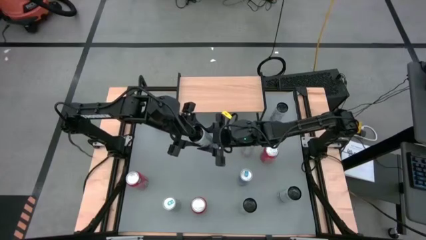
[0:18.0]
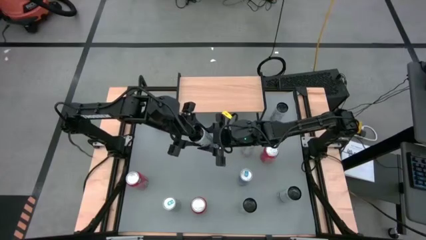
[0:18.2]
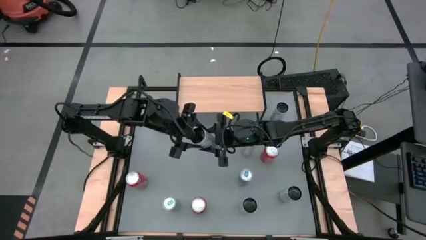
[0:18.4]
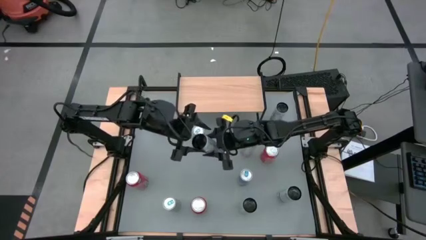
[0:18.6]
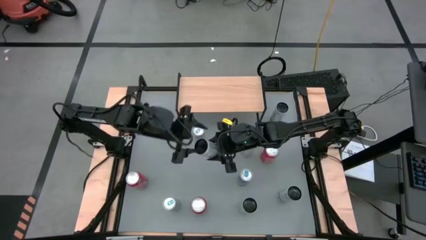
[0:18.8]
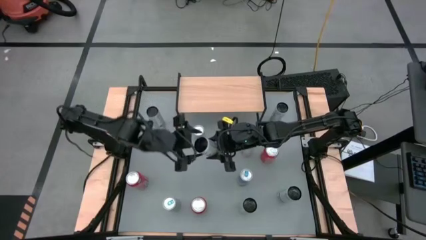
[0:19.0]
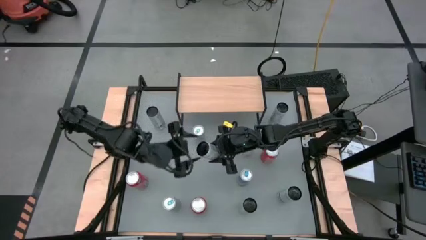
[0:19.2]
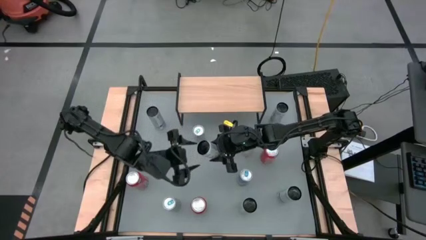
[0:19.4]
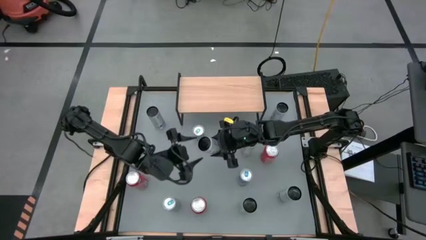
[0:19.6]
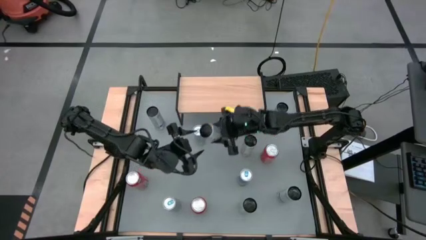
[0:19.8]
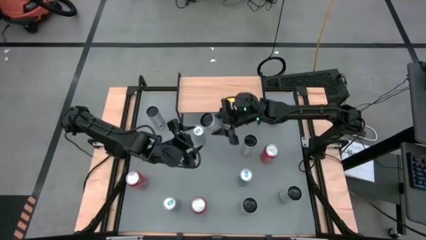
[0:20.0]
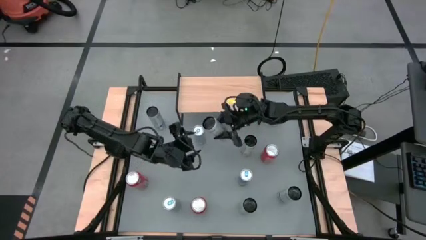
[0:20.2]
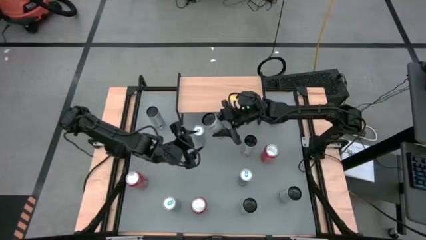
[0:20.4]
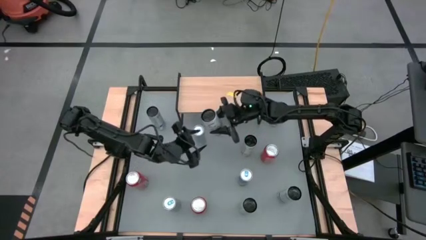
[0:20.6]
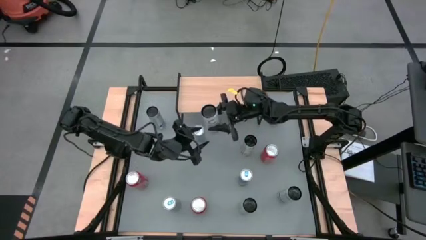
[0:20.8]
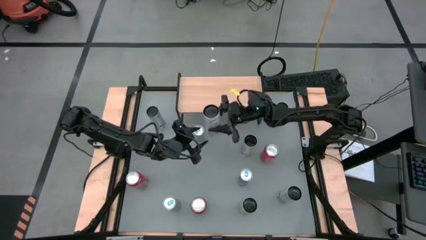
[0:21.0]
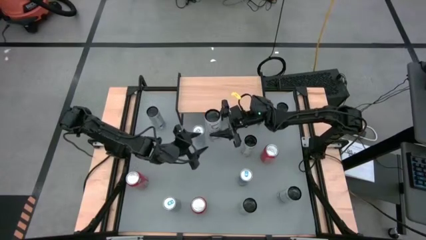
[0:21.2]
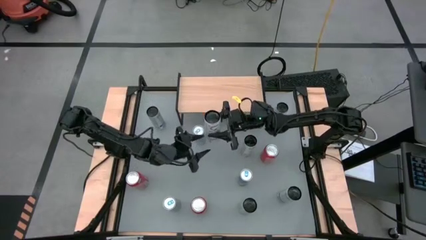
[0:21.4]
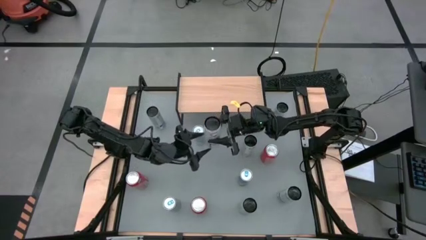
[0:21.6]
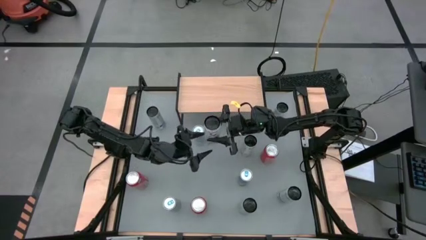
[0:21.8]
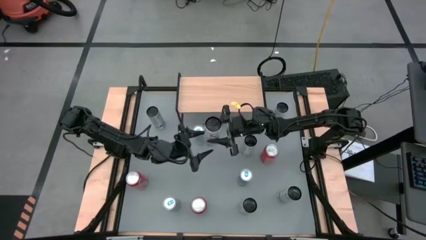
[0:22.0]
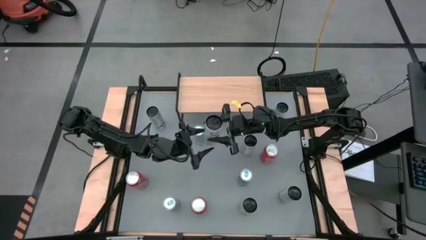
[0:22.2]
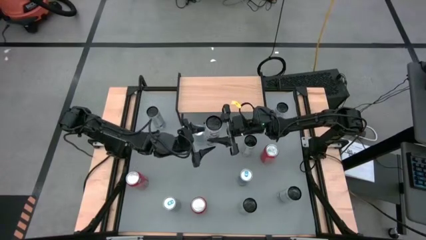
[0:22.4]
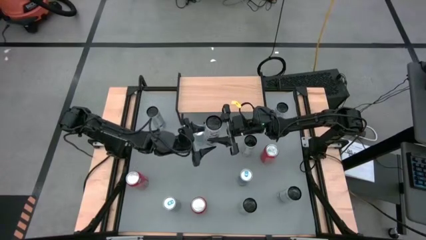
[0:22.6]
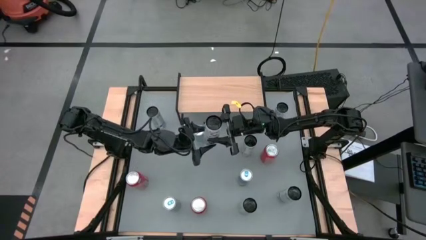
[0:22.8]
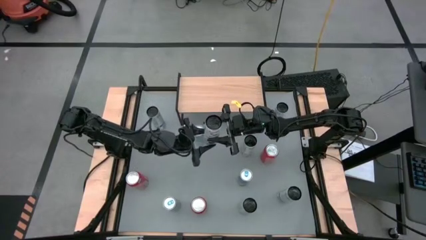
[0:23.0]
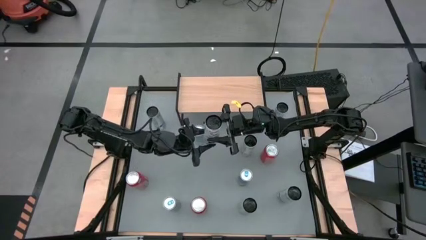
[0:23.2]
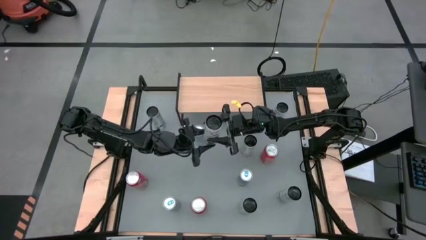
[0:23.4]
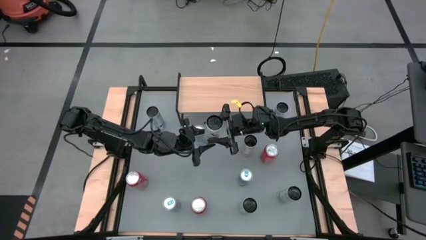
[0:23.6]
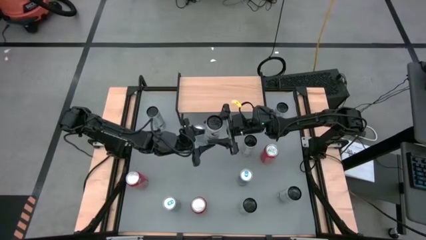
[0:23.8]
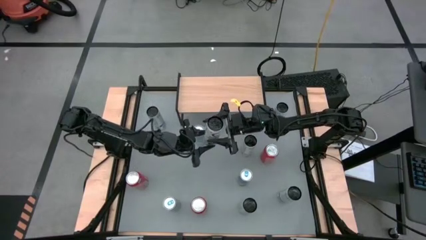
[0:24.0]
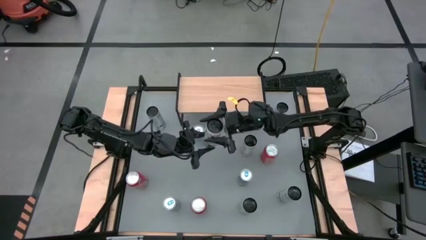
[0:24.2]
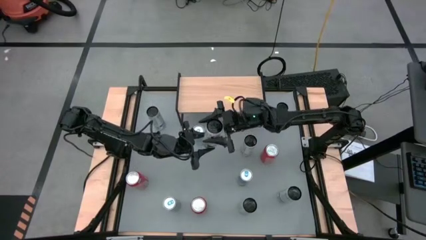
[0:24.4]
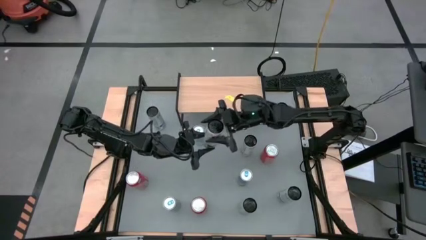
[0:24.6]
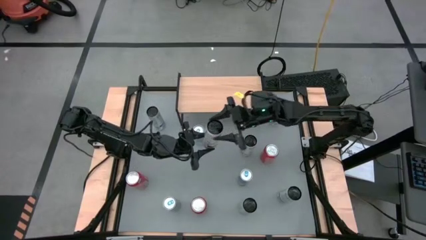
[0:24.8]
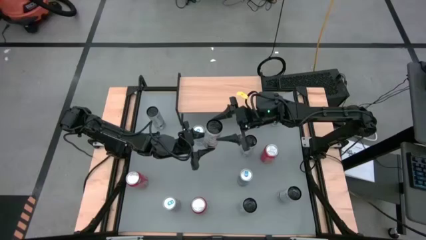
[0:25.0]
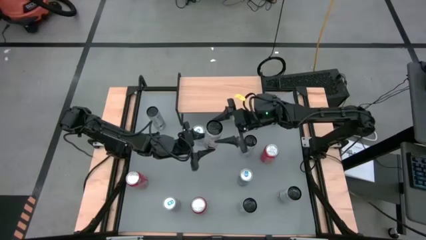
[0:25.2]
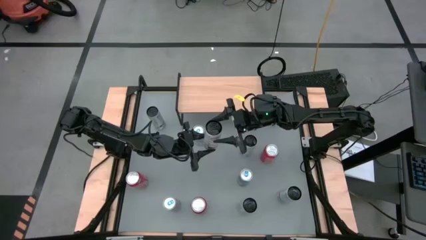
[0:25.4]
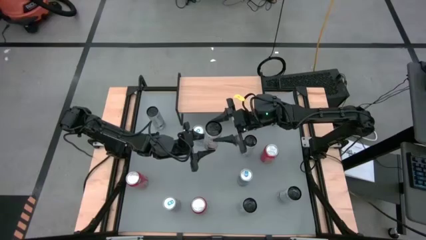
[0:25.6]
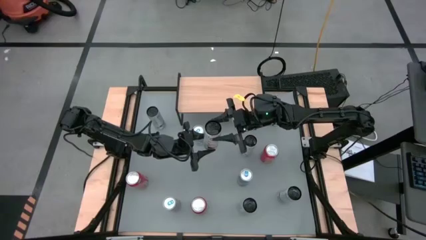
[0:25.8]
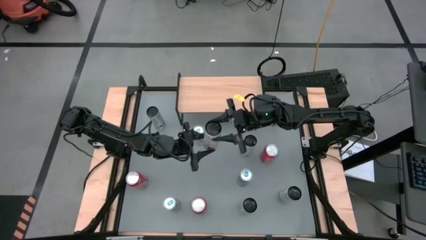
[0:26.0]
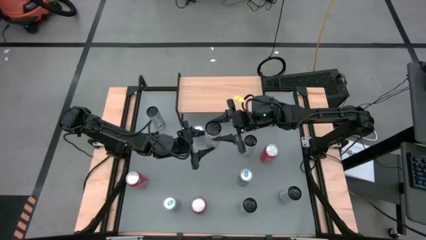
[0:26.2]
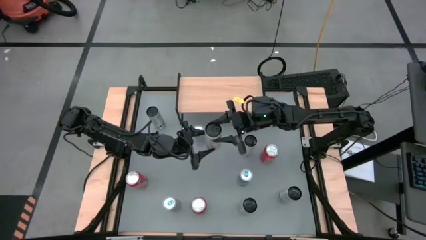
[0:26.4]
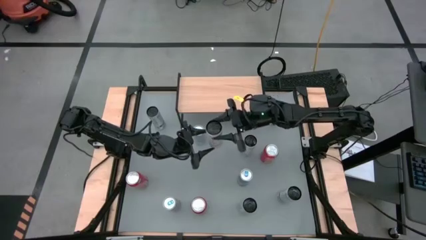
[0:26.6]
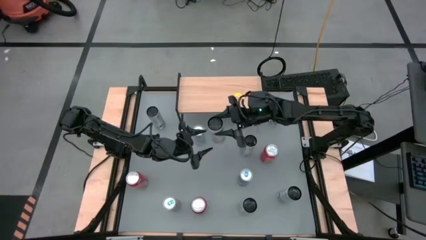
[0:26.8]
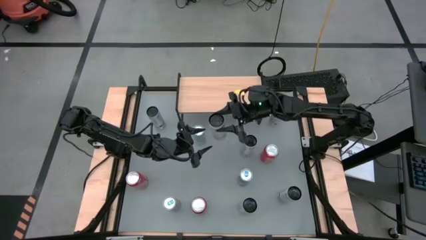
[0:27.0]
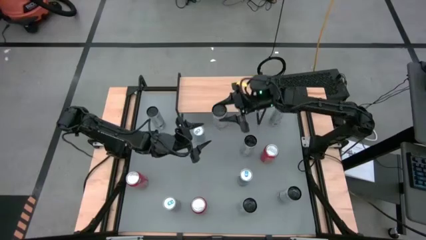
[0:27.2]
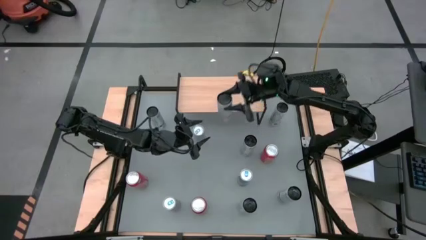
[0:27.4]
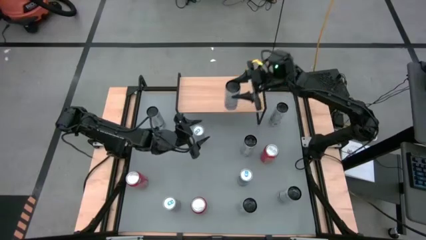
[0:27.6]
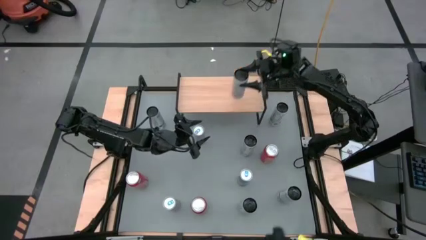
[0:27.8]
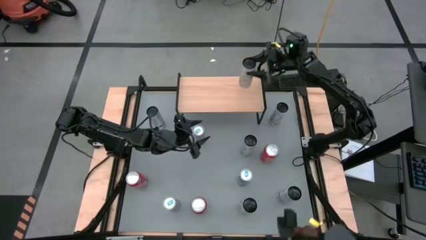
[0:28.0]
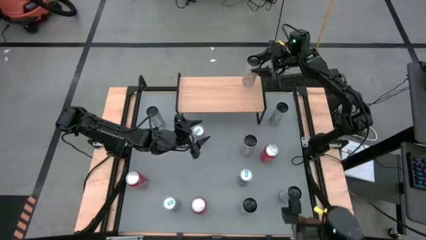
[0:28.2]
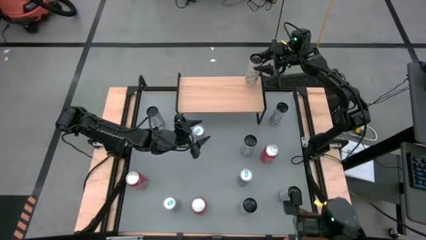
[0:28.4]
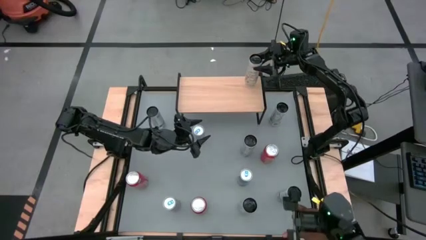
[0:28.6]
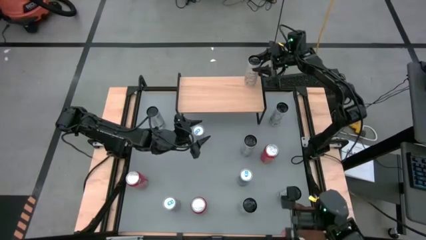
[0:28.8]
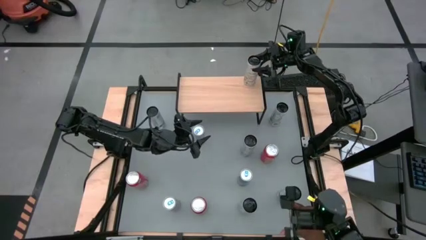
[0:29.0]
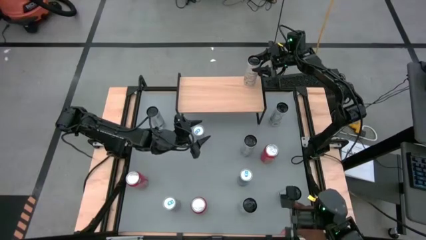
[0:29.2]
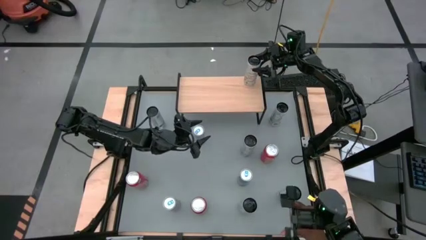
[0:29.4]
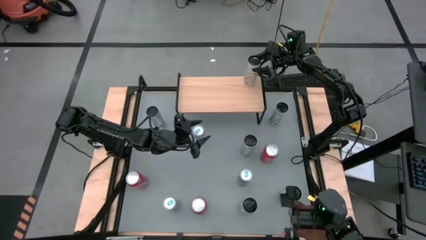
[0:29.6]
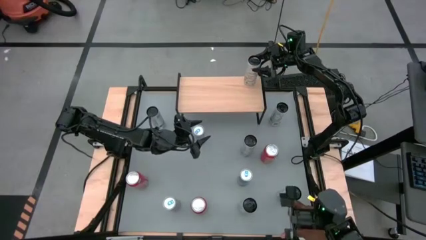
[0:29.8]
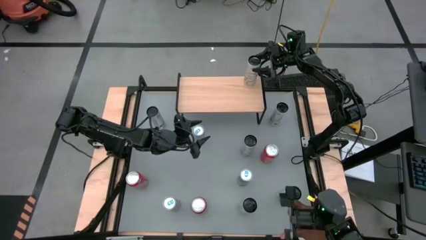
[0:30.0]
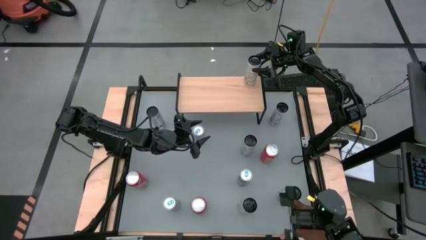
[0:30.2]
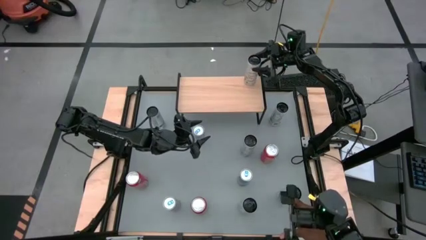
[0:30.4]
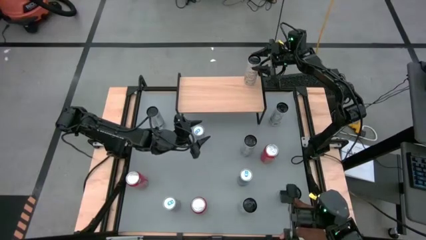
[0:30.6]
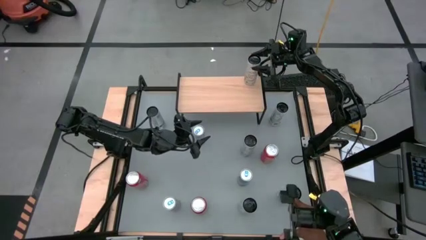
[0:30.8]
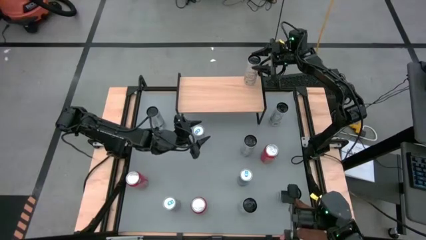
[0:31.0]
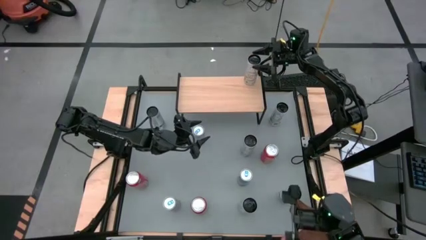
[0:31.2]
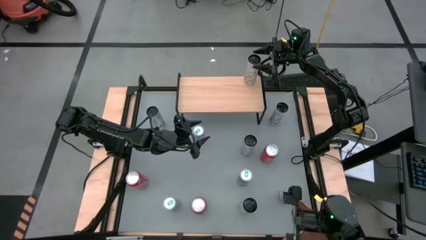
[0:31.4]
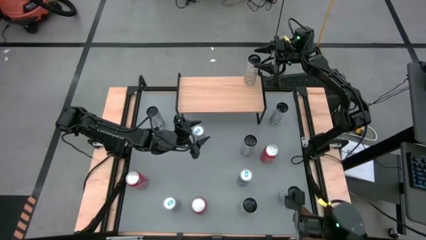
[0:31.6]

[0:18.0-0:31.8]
Task: Place canned beverage on shelf
Put the left yellow soda can on the shelf

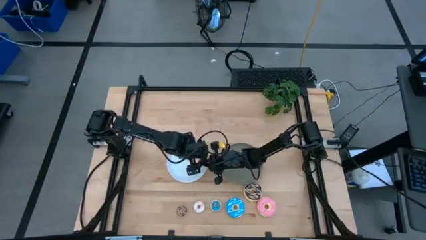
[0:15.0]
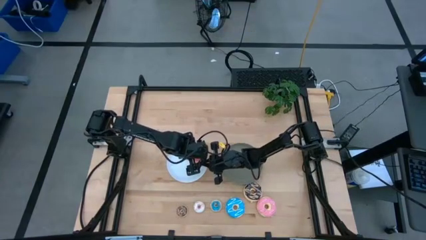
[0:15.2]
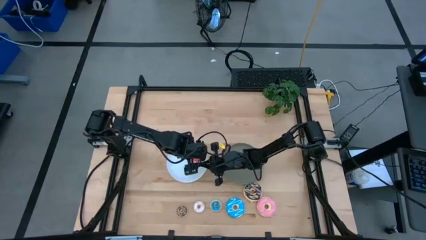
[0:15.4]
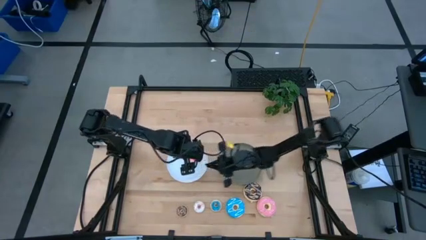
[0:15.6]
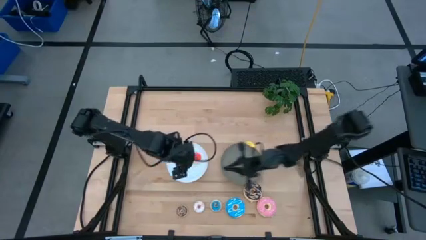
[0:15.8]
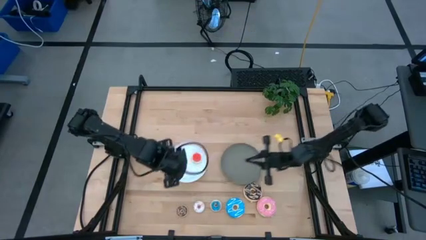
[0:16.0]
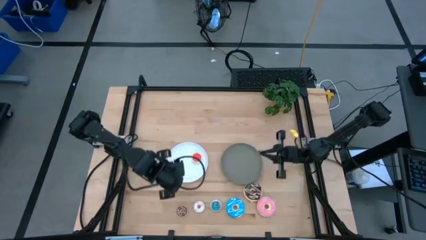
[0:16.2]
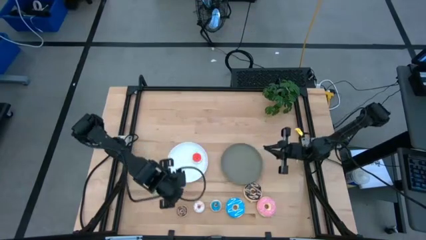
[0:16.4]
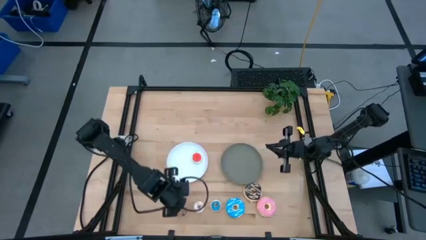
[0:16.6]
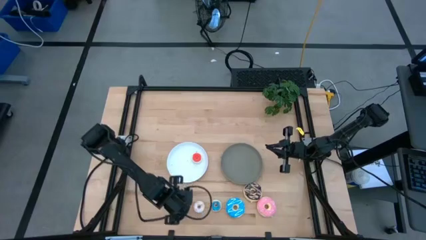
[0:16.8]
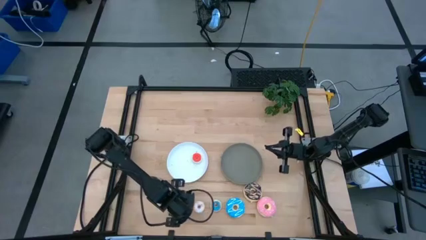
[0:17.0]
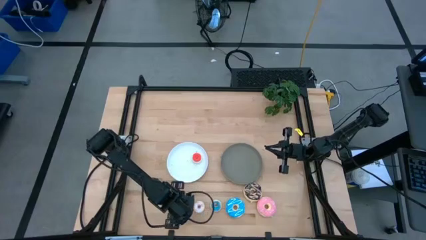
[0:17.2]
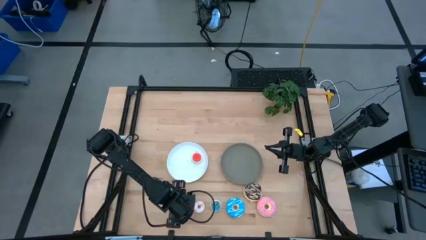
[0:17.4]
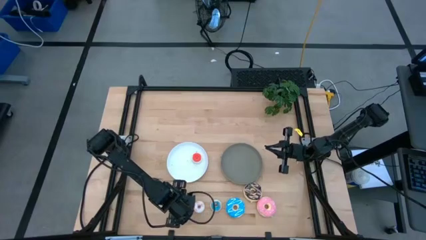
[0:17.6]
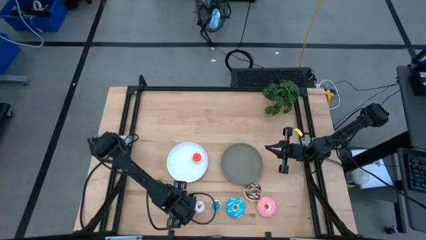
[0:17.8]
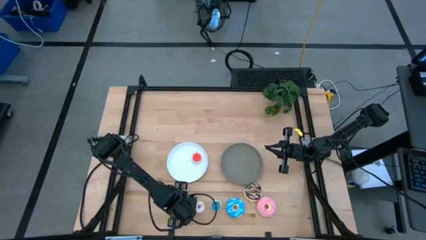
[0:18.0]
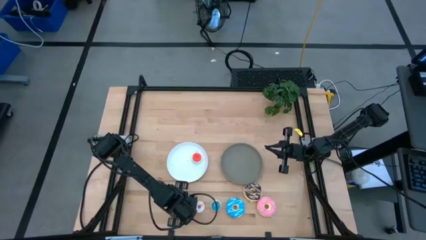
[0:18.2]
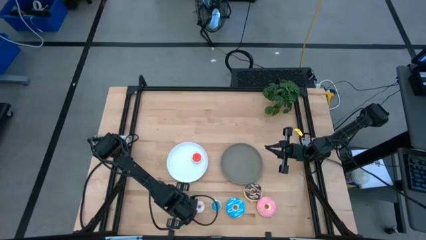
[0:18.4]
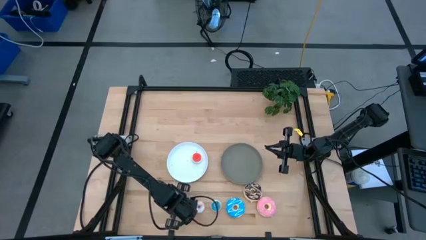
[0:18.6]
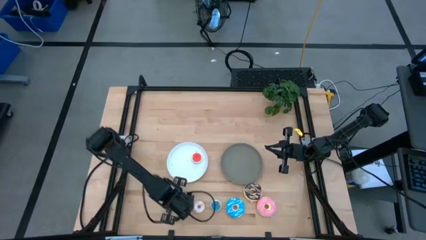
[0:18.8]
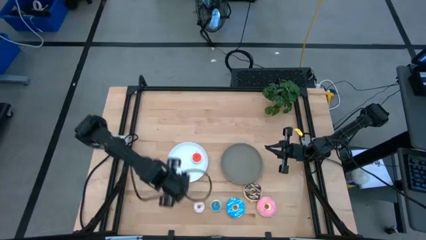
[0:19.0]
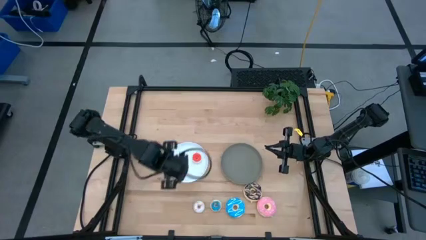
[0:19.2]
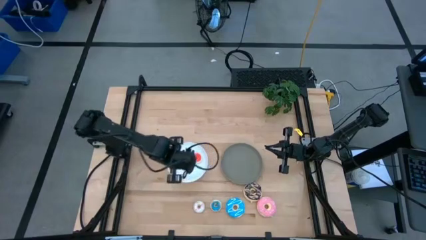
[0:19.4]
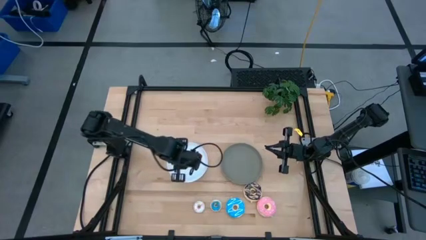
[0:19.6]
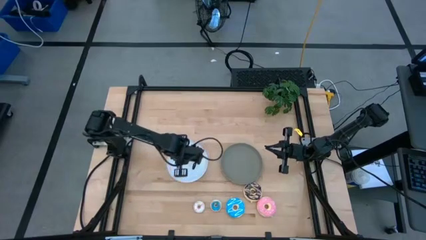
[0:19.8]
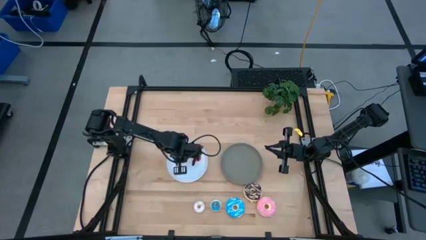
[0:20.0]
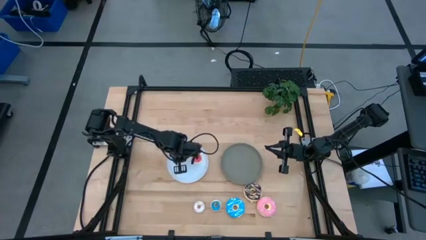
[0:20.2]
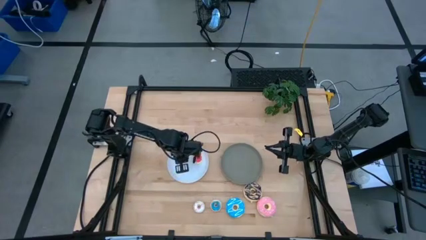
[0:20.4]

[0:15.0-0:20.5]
Task: Pick & Place donuts
Put the small brown donut on the white plate
